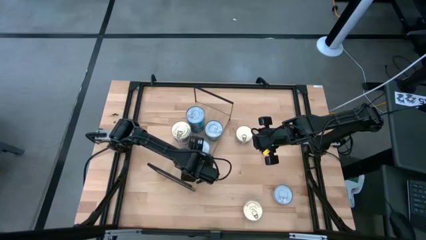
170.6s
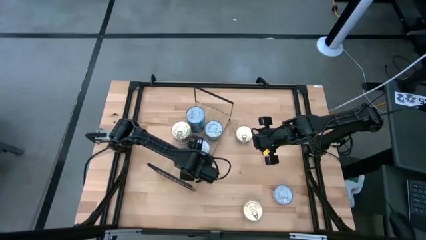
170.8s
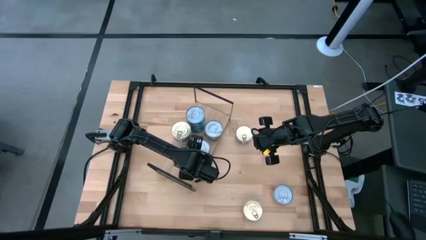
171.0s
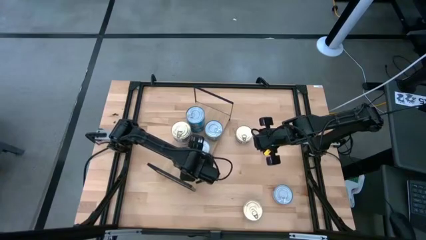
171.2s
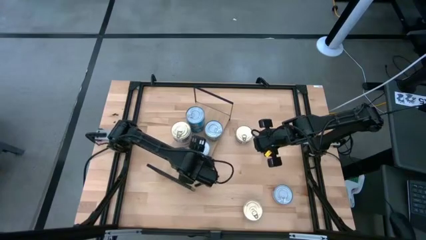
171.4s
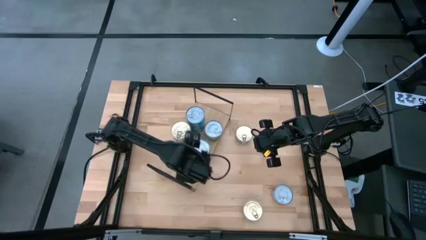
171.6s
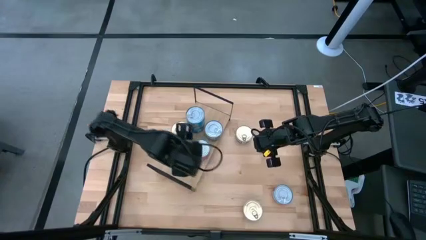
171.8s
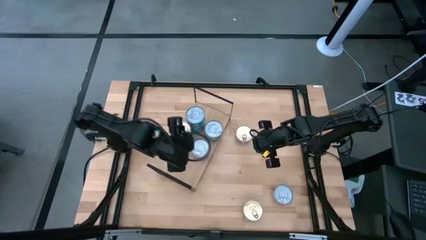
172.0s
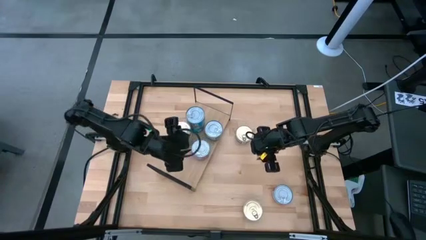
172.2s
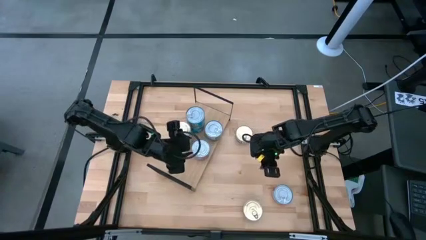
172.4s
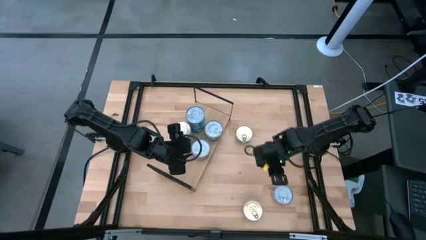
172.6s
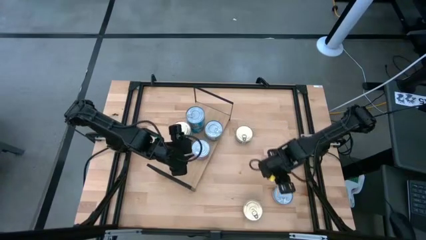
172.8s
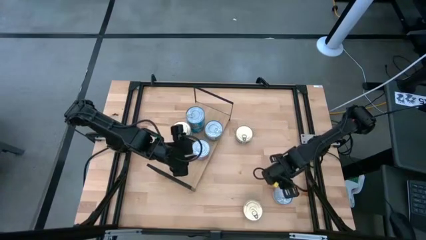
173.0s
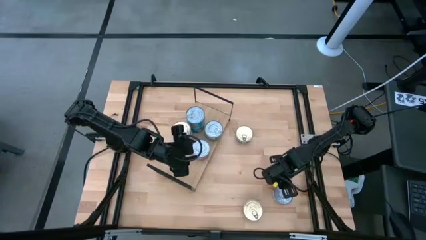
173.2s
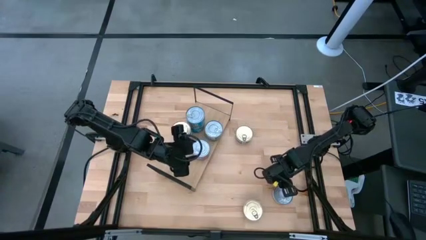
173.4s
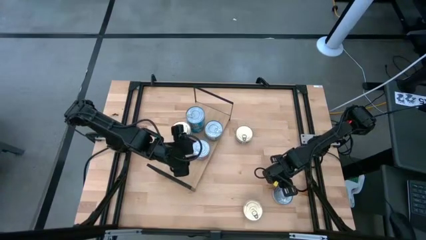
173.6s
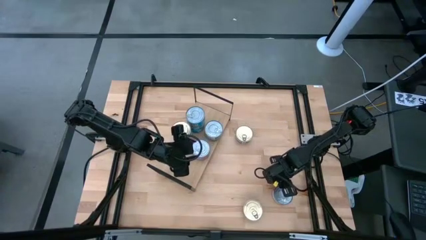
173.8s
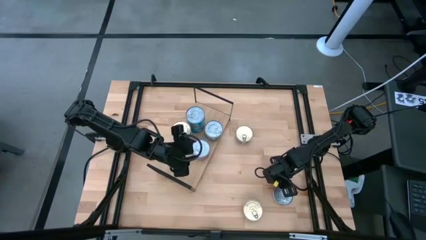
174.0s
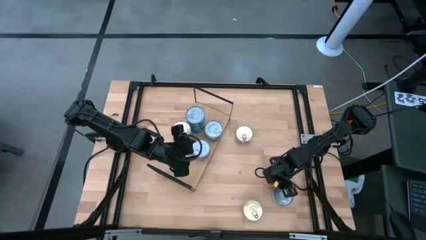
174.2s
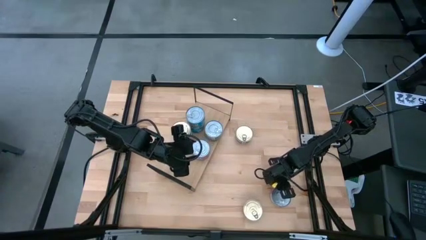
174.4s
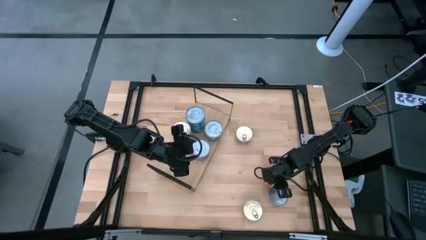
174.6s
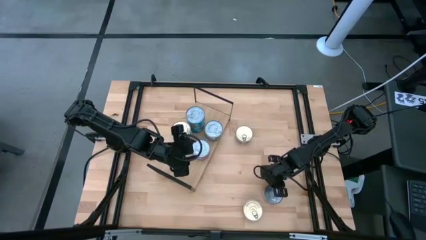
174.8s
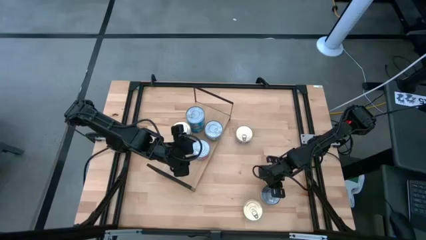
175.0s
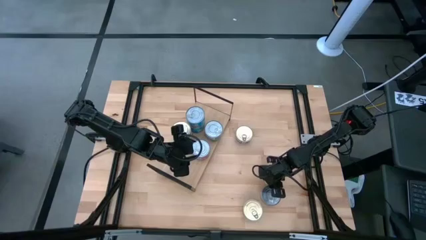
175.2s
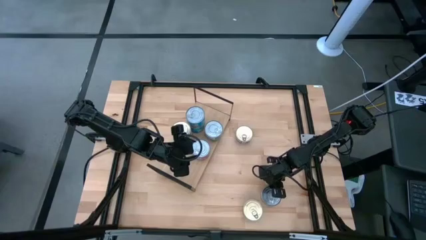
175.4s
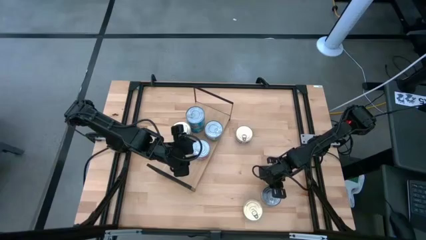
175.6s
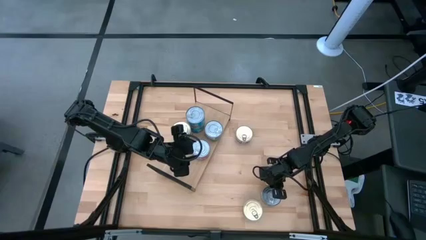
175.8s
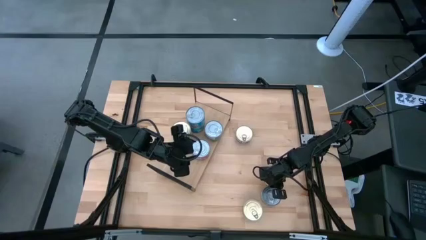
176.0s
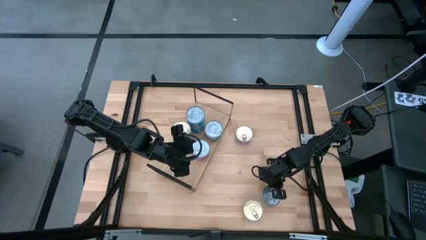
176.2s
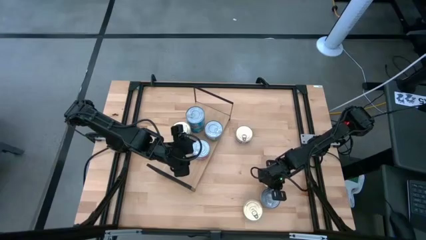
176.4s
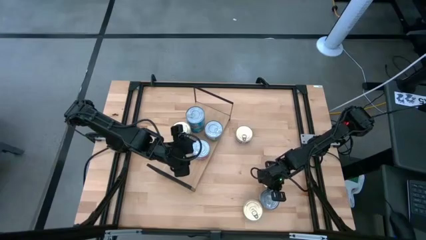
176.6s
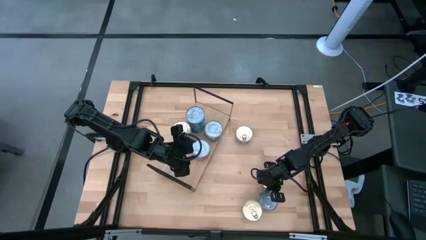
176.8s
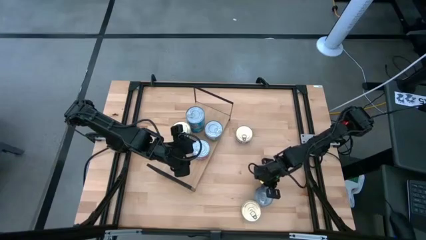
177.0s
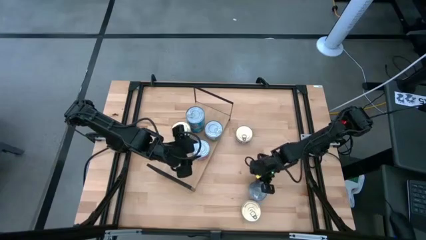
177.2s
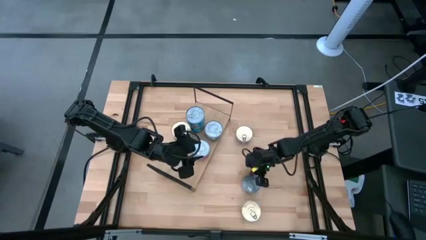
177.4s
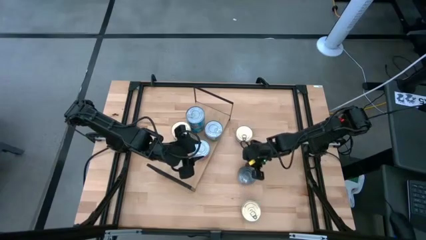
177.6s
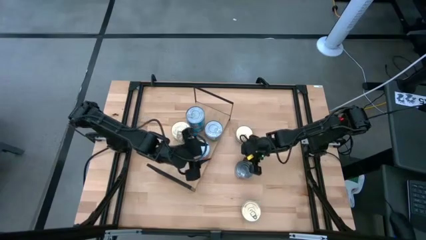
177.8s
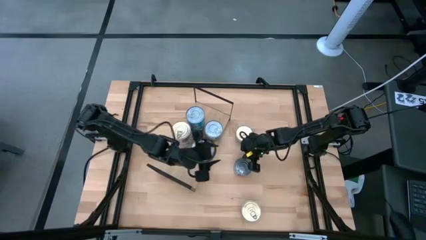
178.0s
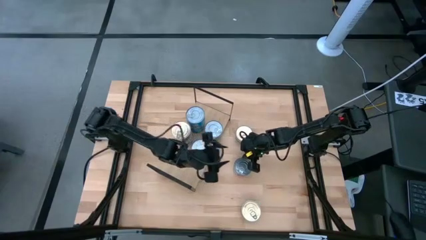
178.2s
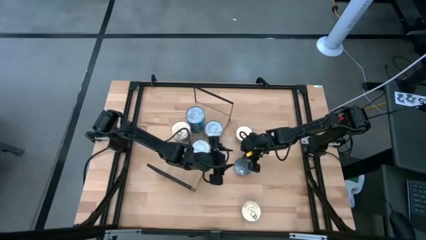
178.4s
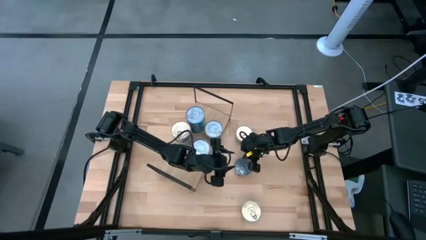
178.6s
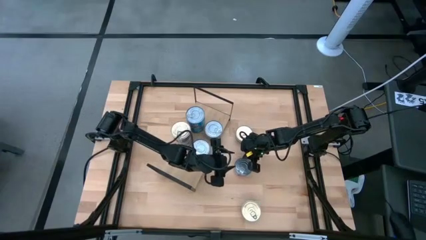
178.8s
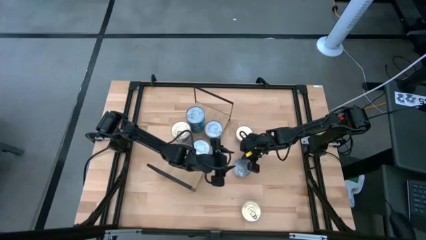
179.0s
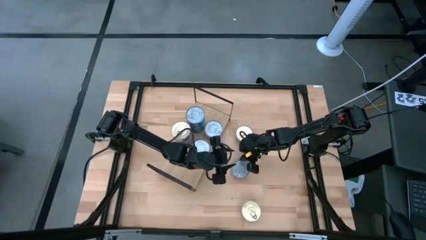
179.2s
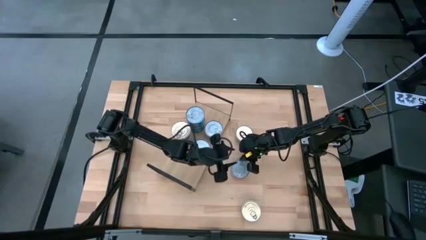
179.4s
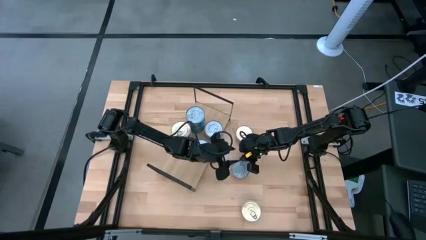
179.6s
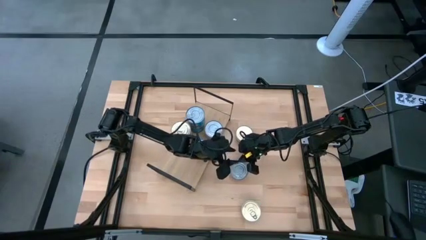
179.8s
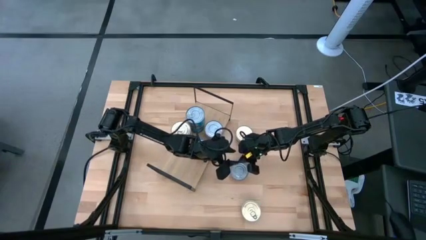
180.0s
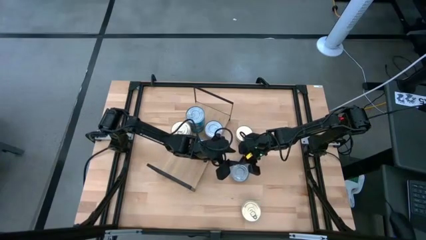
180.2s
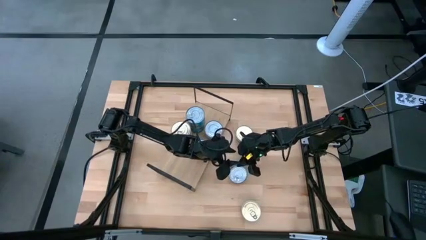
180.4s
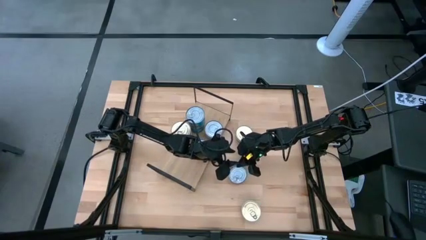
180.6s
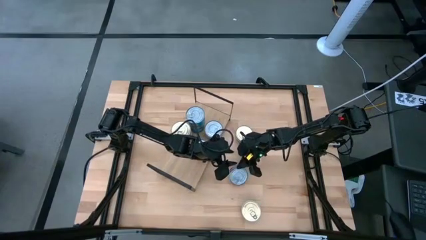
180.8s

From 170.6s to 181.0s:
Task: Stack canned seafood by type on shelf
Stack the red tuna can on top of the red tuna can on the shelf

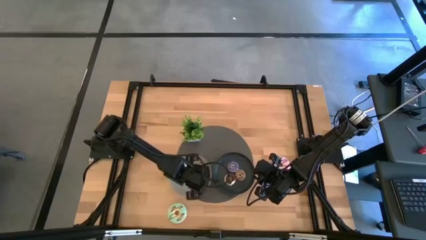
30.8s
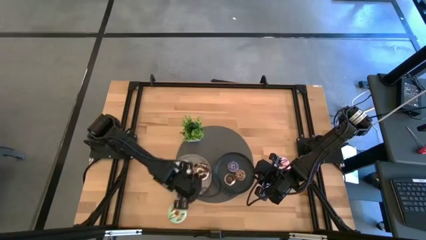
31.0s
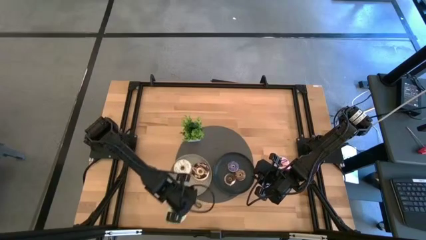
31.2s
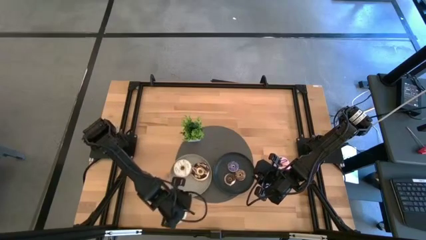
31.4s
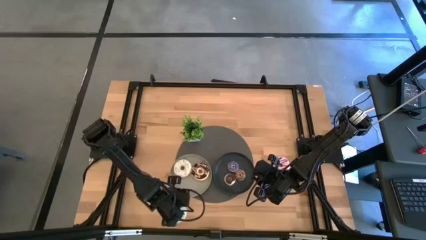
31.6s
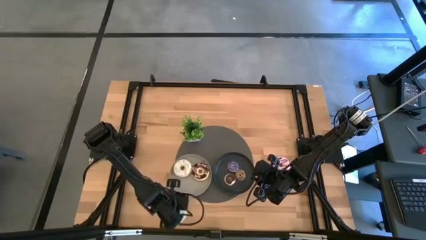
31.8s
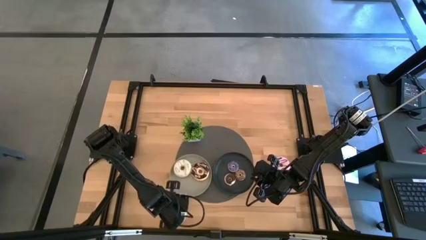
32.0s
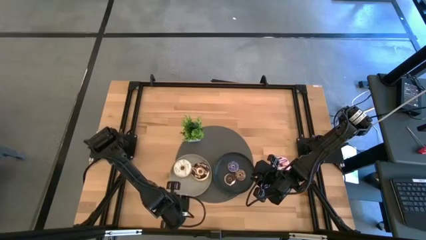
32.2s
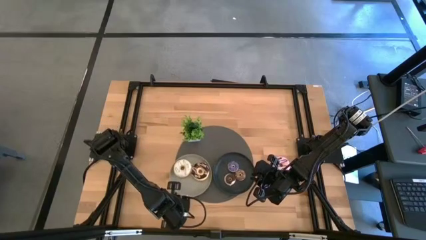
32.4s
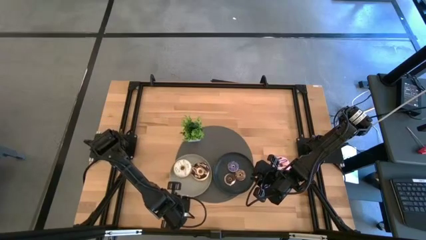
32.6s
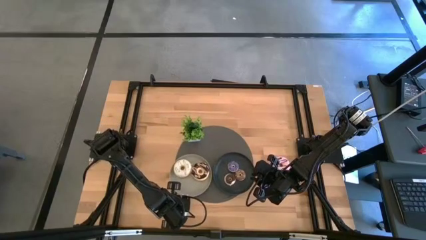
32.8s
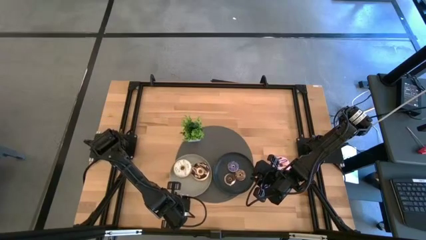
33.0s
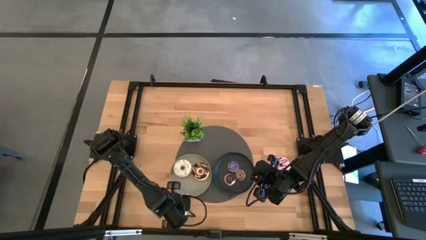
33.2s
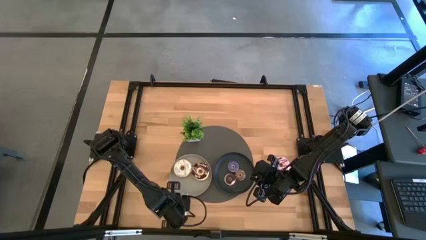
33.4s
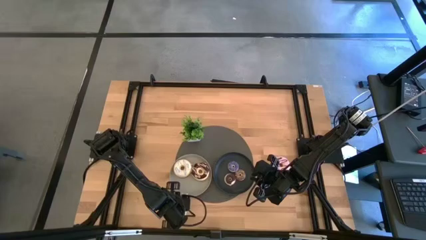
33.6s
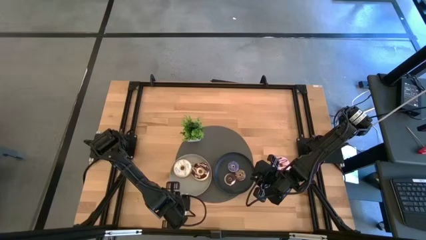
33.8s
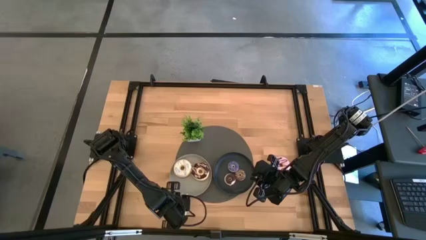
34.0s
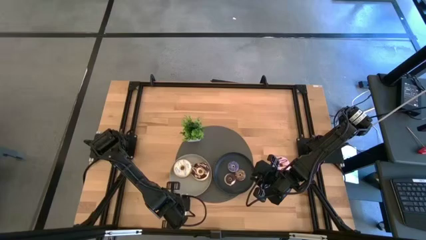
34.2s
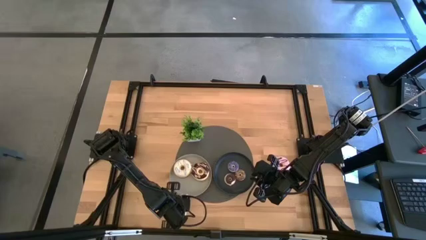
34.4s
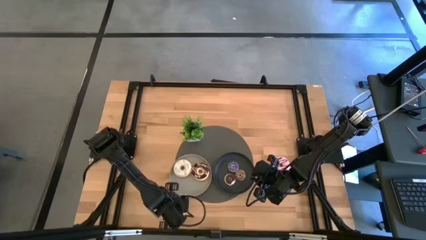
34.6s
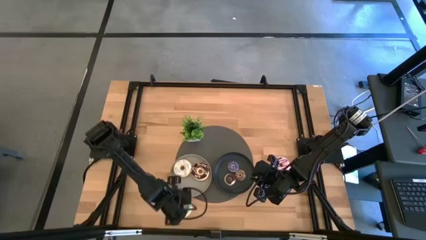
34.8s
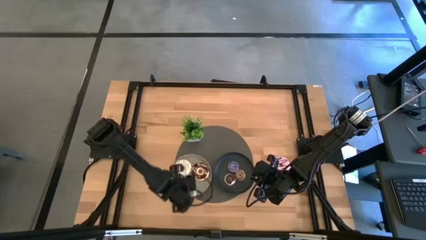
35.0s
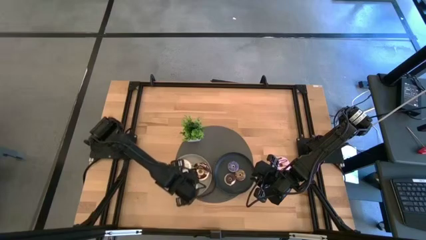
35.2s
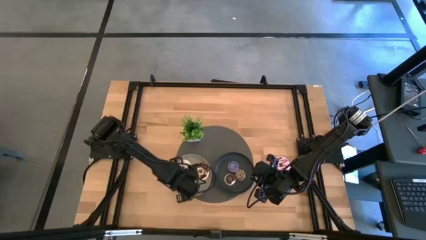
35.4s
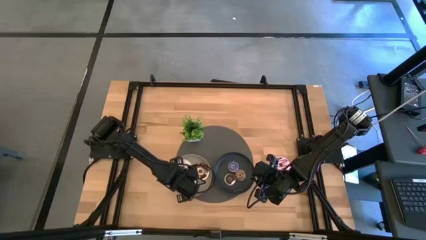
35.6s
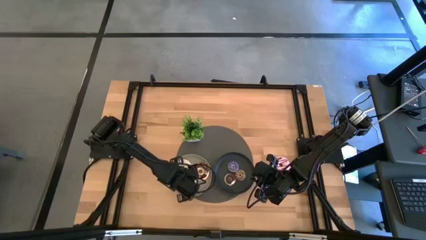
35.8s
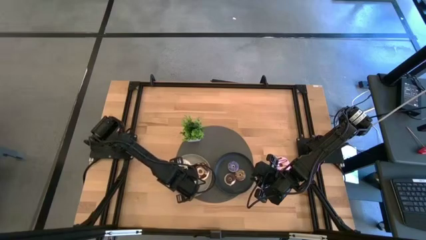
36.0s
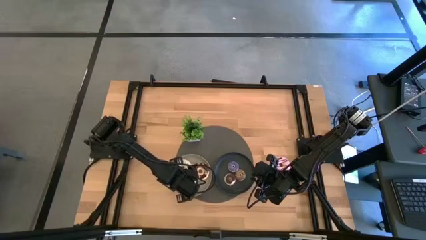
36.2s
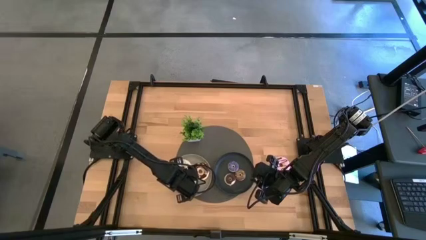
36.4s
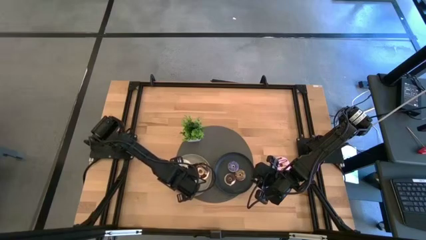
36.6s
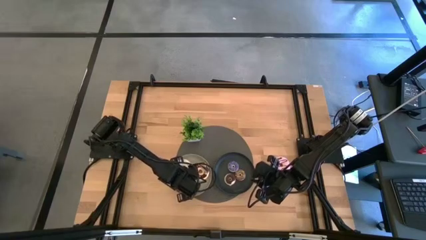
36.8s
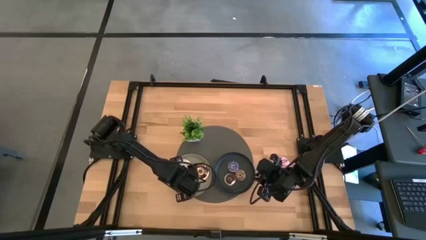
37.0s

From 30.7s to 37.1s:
Task: Pick & Place donuts
Put the large light blue donut on the gray plate
